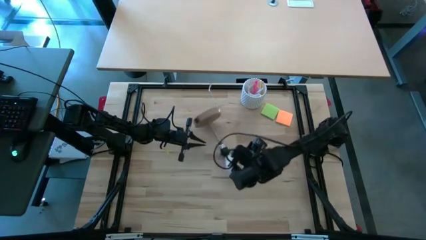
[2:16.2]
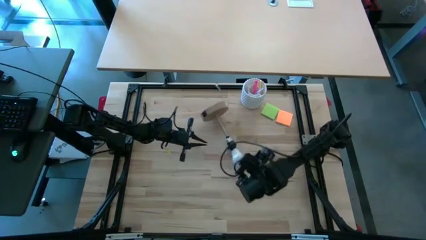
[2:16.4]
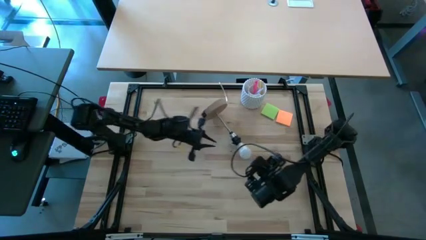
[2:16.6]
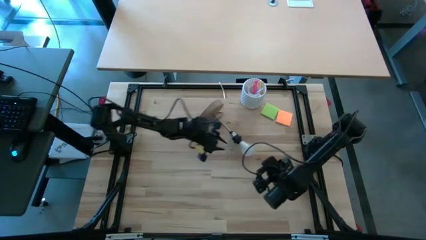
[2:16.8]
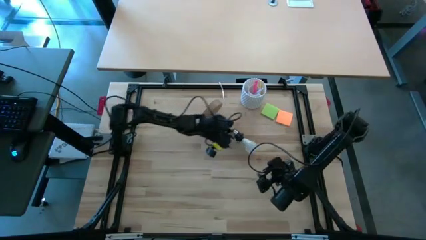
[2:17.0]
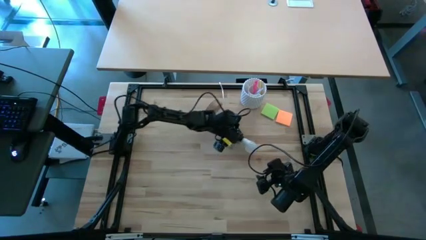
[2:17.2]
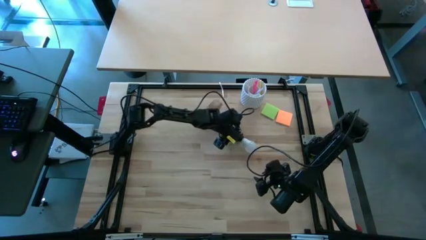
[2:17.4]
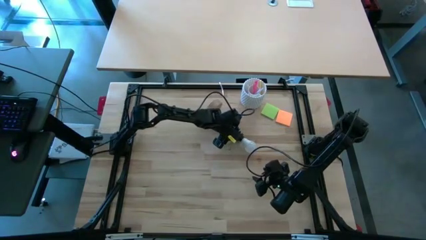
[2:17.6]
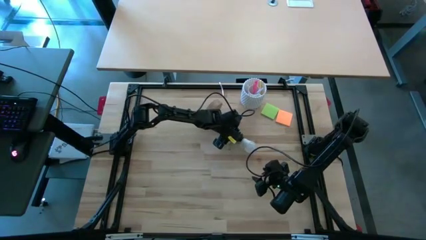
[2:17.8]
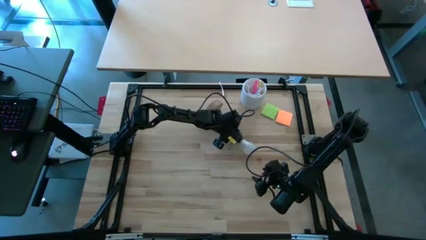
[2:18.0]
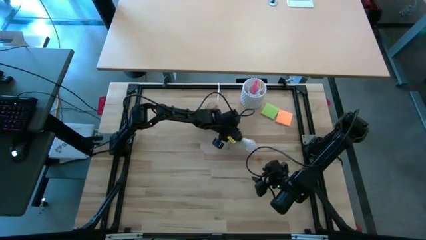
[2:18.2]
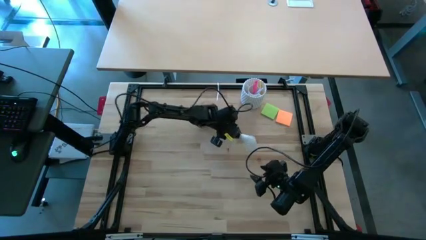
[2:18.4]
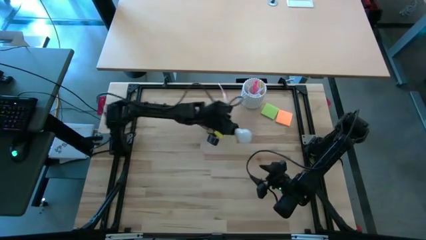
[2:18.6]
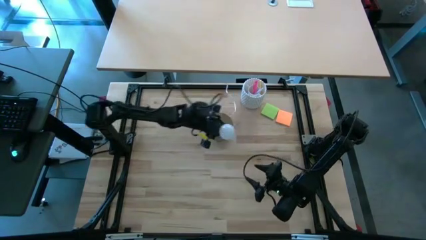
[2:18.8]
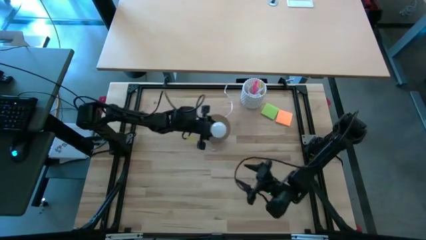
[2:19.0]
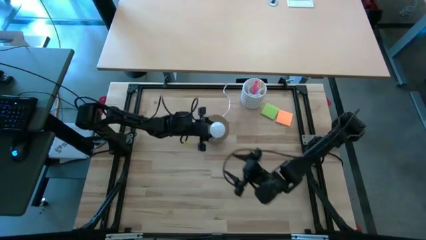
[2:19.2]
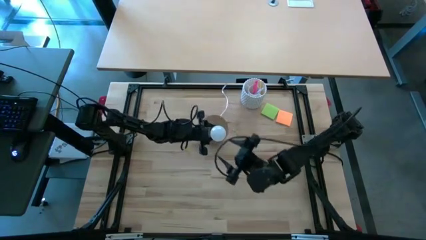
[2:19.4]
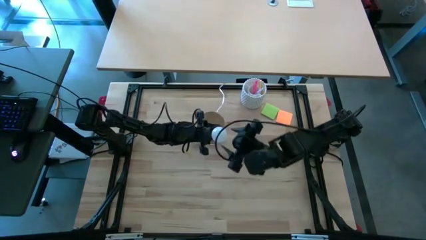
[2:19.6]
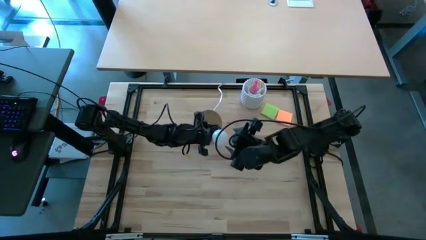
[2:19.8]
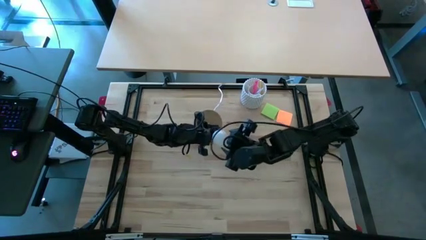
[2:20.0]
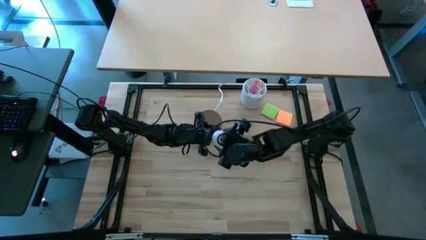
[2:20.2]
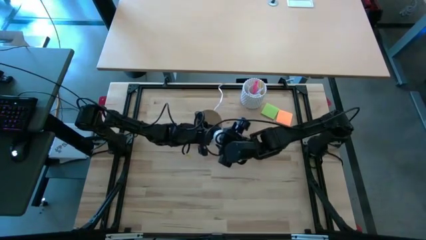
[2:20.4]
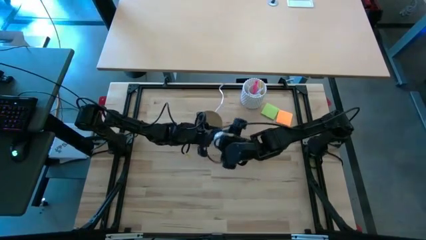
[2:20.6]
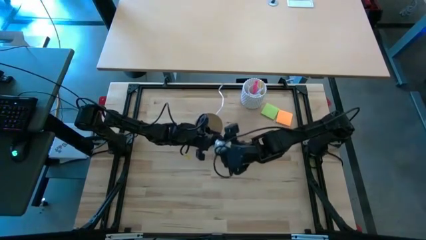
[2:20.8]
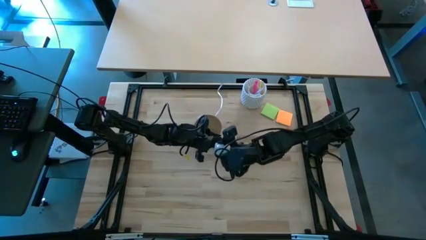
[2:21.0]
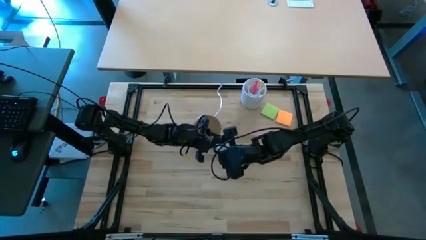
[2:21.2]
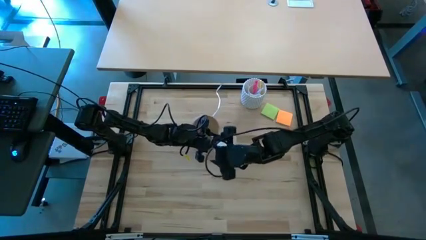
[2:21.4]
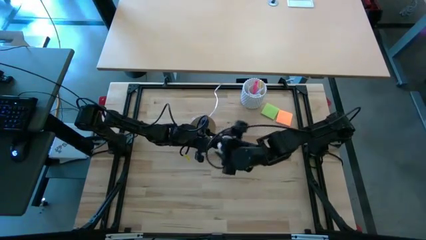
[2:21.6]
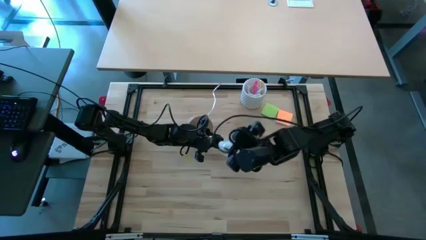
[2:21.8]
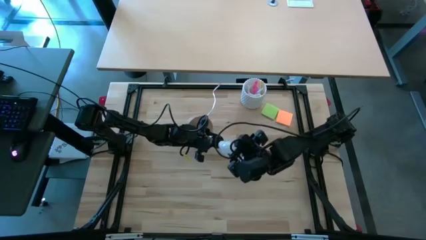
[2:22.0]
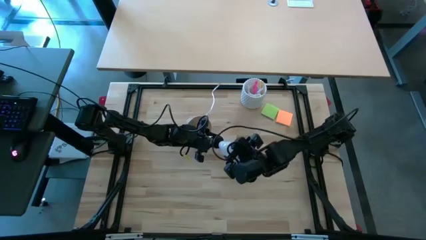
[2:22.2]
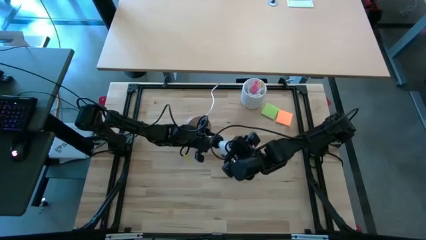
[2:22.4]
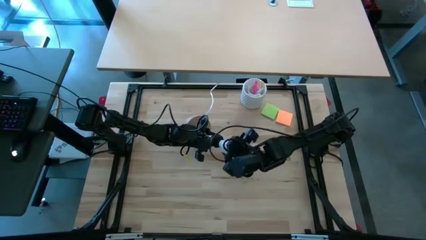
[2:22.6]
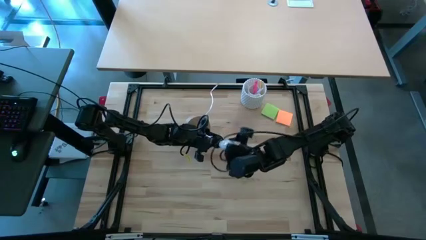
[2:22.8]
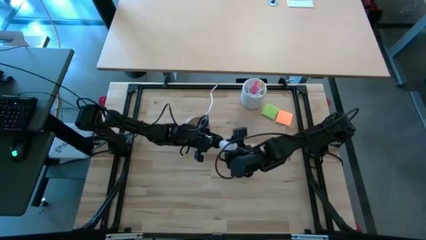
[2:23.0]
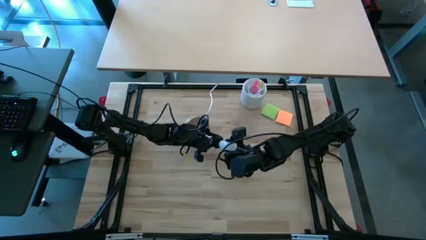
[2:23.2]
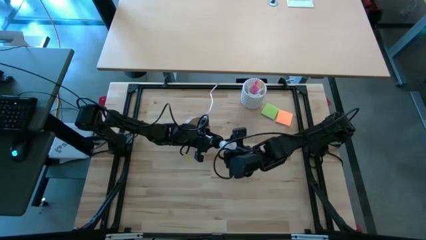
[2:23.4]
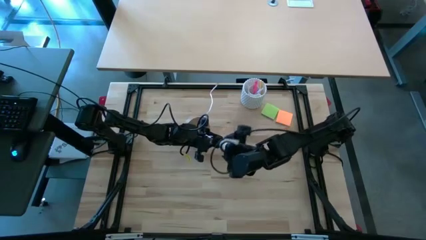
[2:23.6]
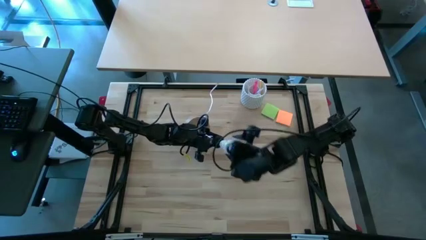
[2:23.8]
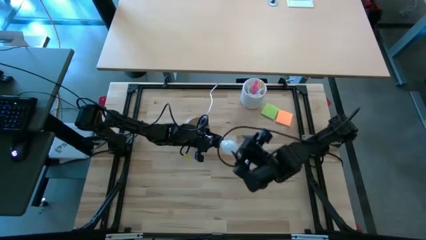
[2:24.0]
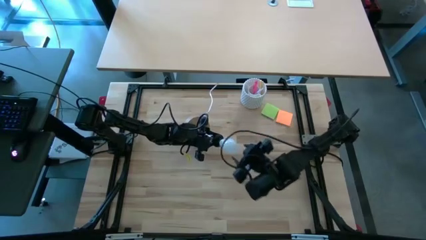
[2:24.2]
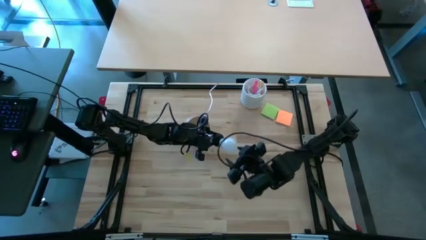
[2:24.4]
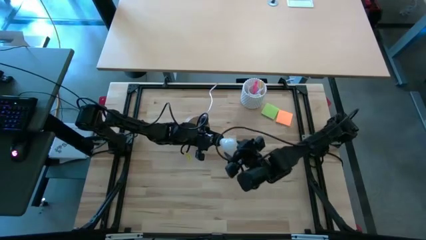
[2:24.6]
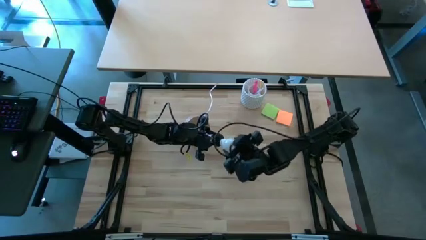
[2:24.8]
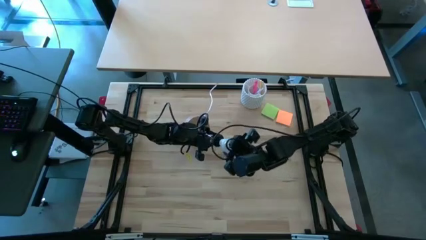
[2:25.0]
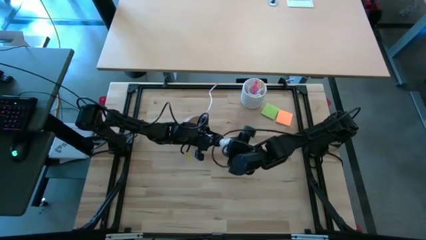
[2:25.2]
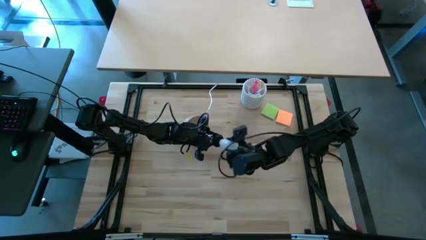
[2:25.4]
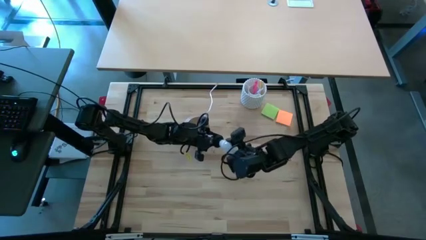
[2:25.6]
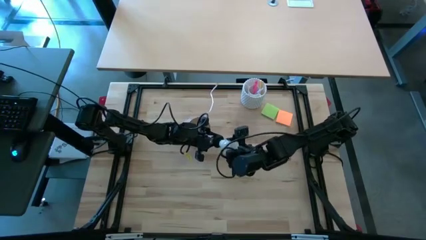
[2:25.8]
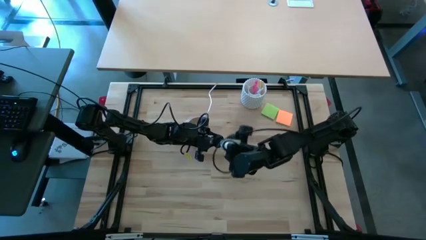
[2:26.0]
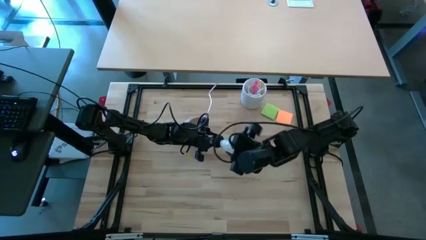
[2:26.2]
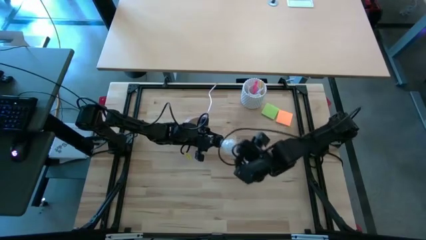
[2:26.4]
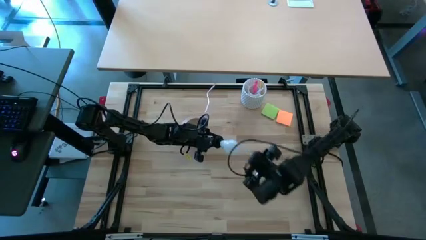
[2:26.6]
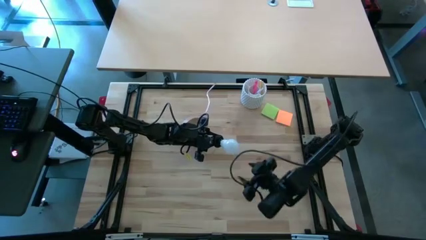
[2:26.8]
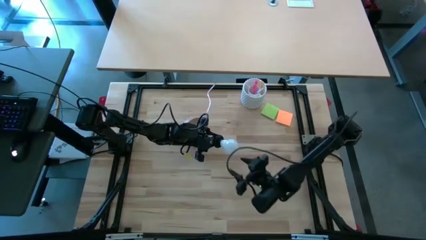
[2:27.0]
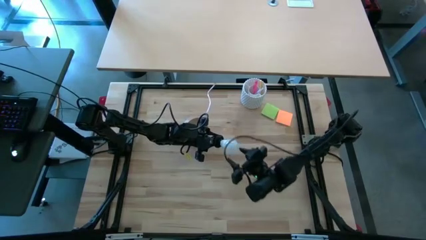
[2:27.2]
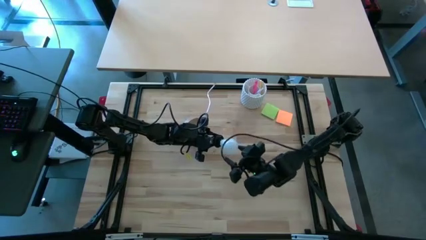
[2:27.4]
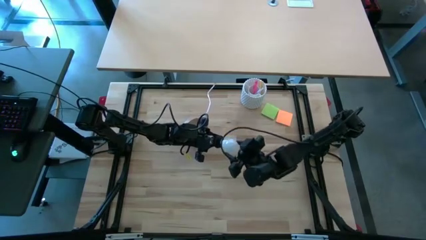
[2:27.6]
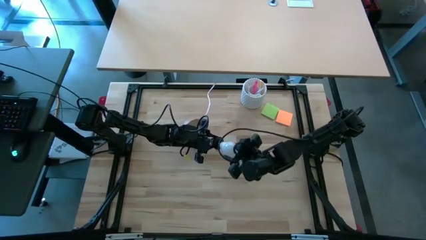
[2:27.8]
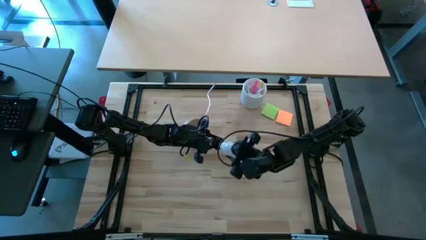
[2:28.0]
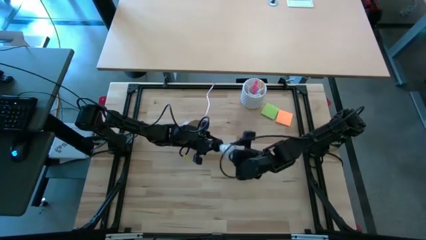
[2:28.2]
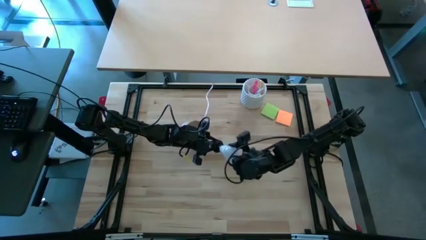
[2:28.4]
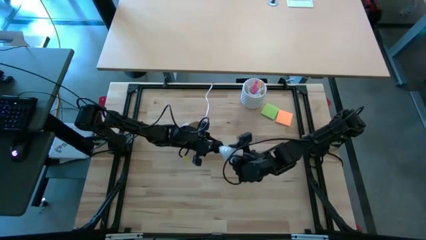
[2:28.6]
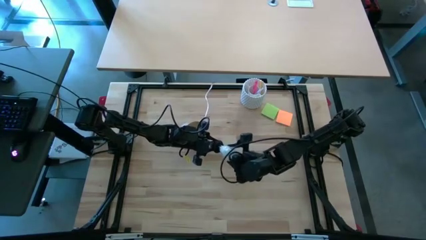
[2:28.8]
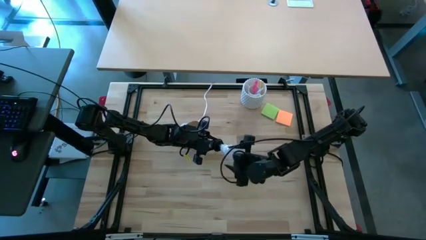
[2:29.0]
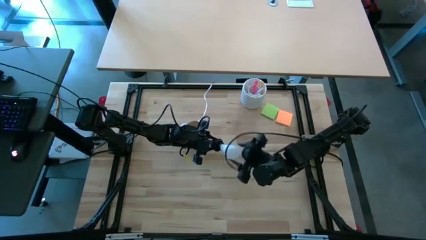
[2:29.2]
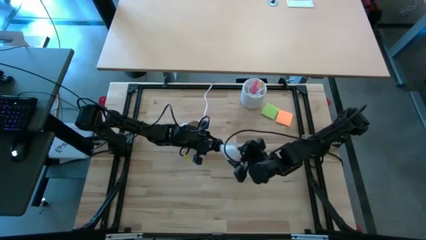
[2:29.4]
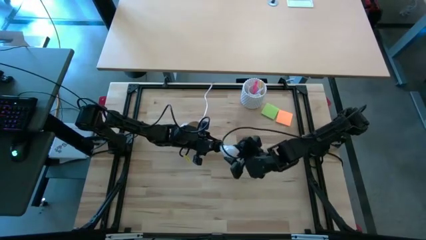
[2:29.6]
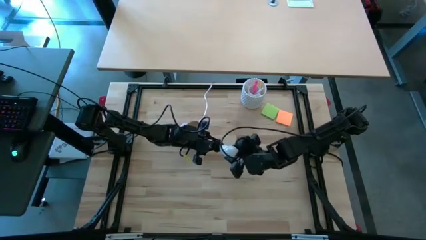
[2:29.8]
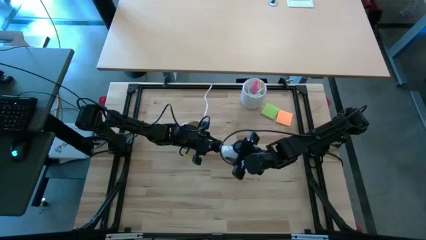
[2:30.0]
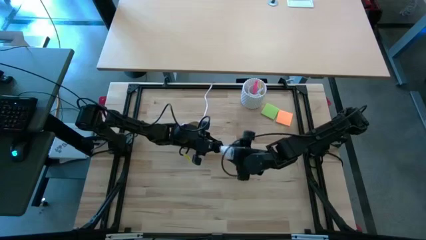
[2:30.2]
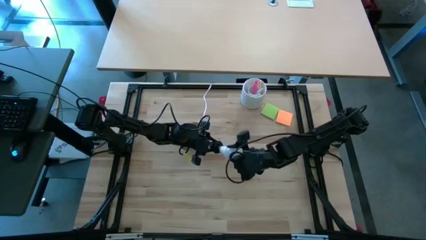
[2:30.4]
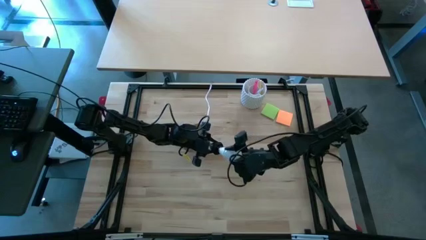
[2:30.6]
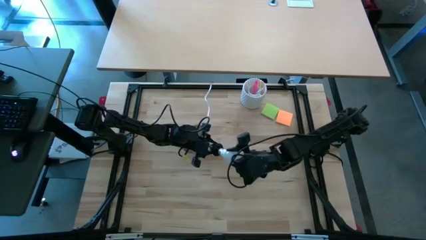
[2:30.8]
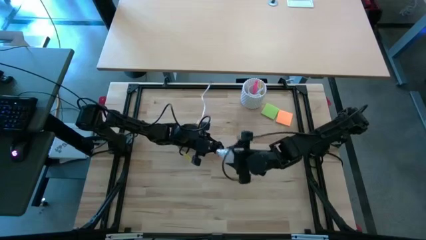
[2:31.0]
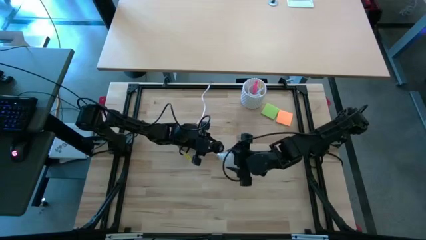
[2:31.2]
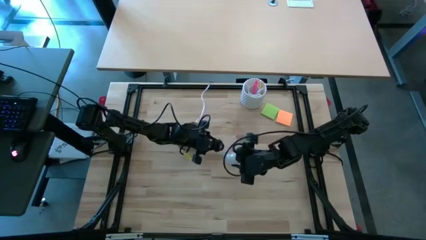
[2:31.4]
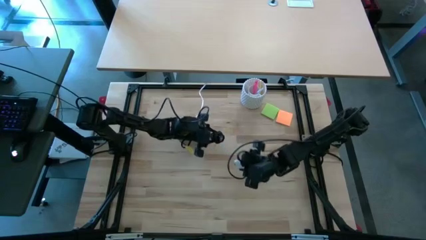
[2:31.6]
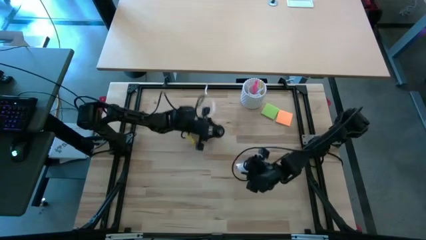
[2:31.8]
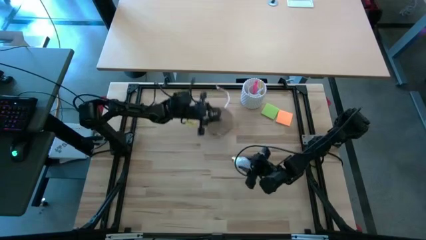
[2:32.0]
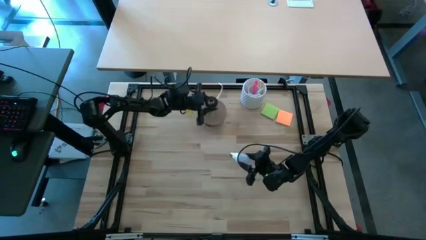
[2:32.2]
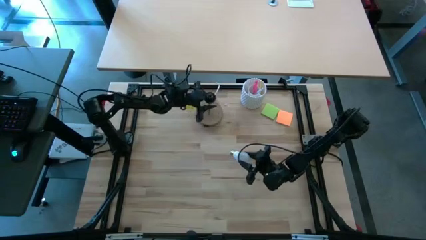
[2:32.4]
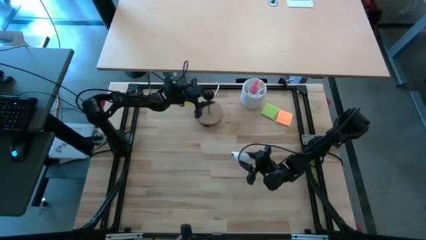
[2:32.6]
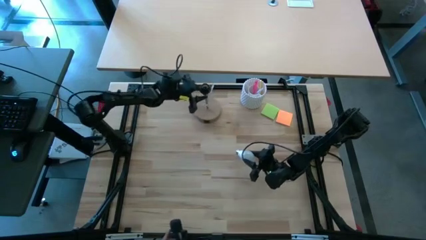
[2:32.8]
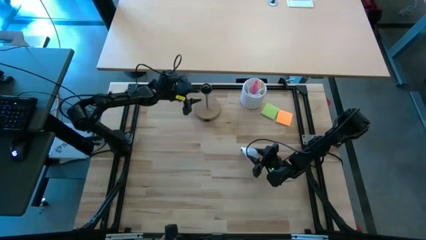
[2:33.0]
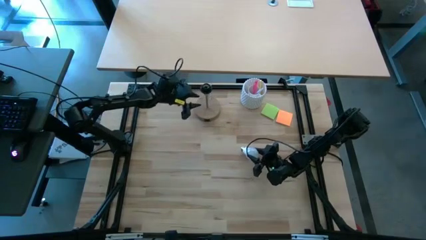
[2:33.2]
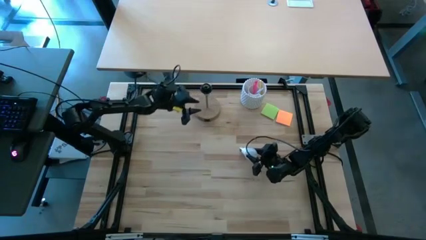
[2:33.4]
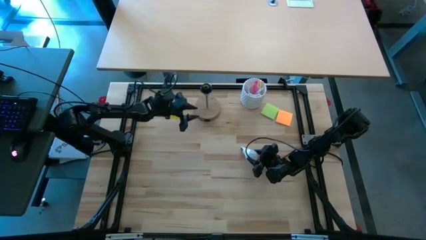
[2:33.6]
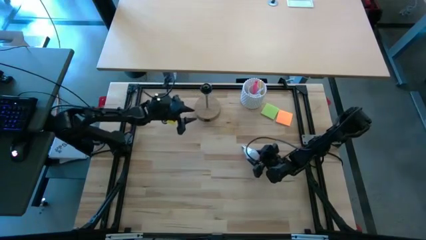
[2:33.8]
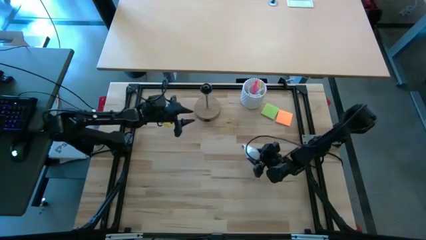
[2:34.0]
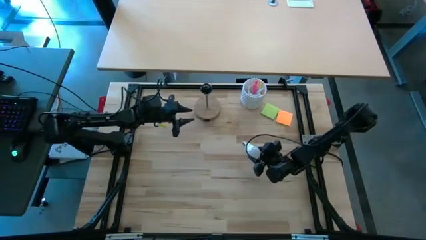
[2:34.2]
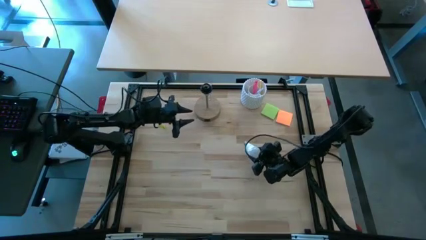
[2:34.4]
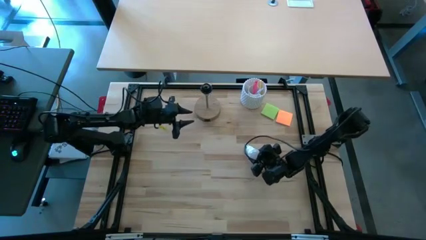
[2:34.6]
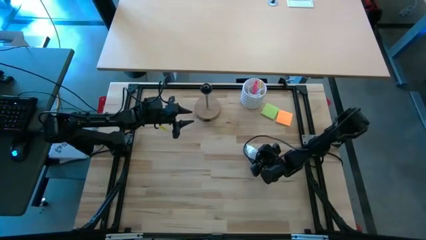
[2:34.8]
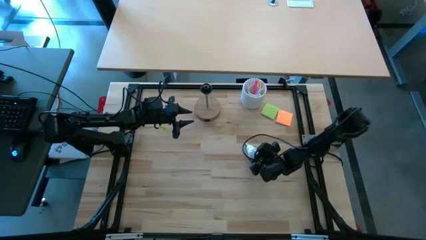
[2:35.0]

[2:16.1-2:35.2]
Task: Screw lightbulb
Remove the white lightbulb from the desk lamp
